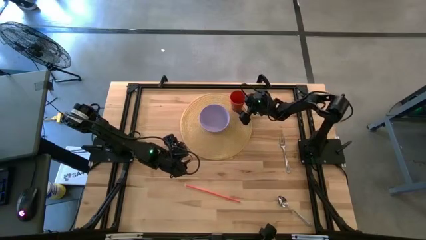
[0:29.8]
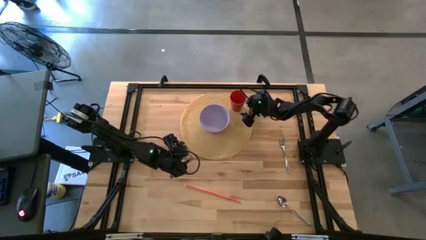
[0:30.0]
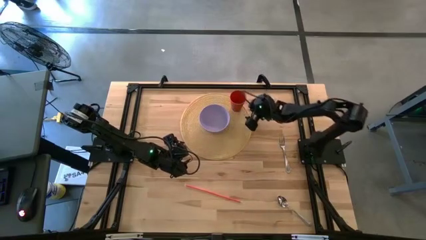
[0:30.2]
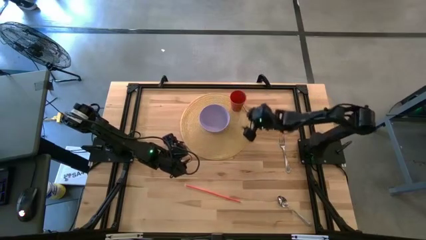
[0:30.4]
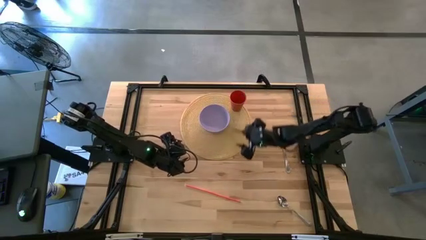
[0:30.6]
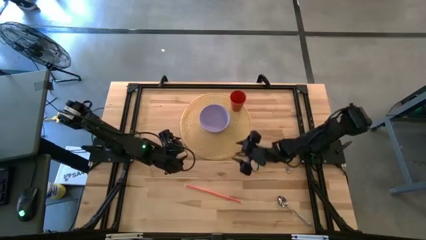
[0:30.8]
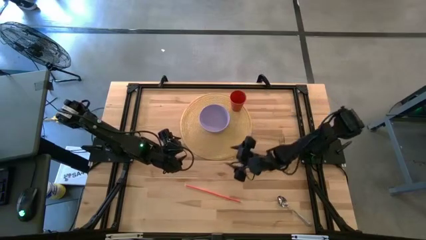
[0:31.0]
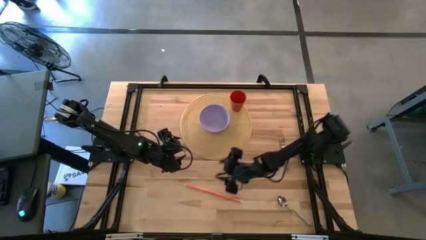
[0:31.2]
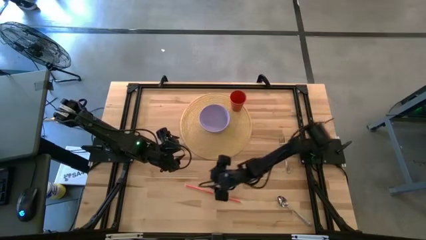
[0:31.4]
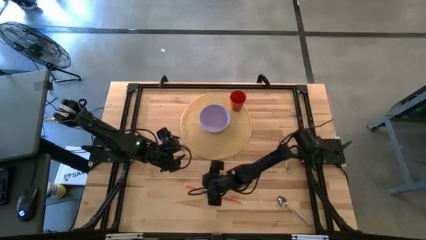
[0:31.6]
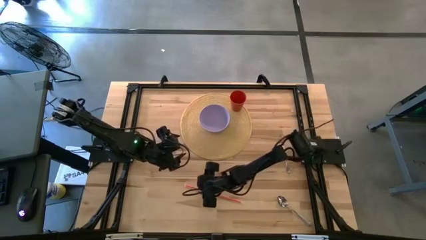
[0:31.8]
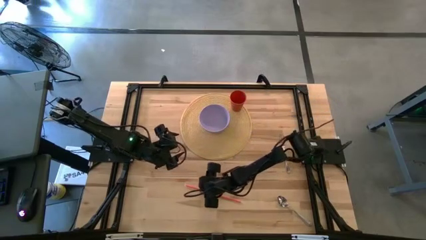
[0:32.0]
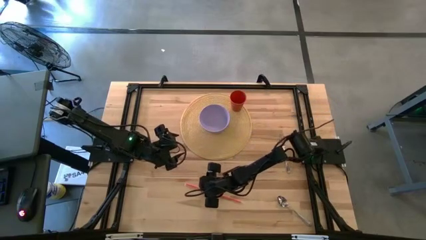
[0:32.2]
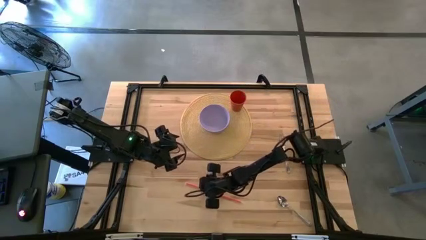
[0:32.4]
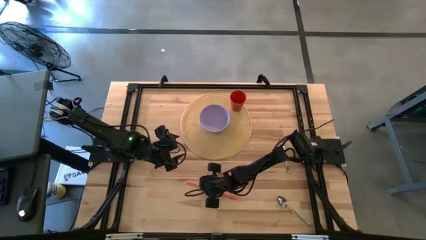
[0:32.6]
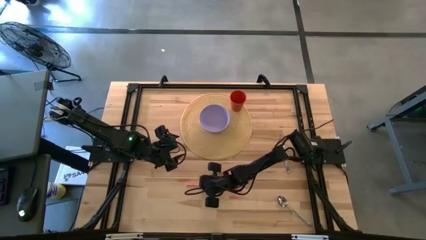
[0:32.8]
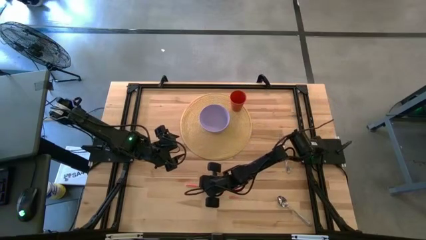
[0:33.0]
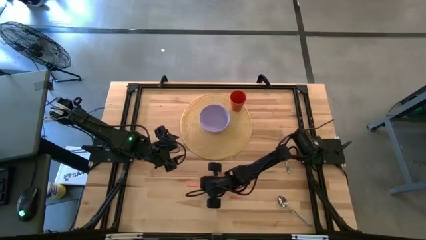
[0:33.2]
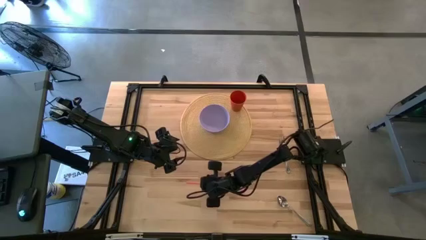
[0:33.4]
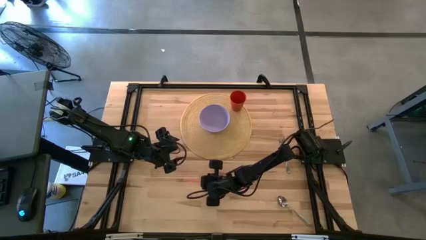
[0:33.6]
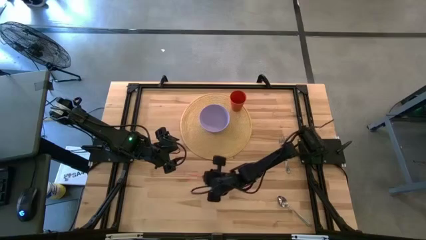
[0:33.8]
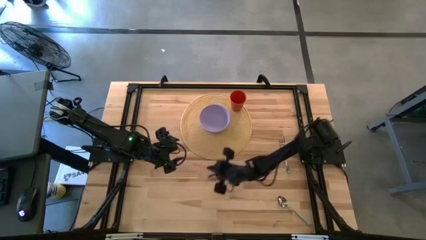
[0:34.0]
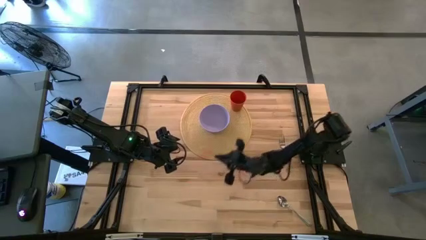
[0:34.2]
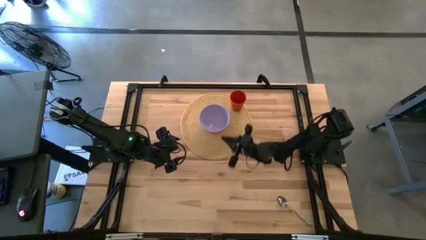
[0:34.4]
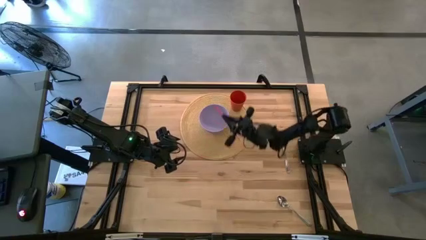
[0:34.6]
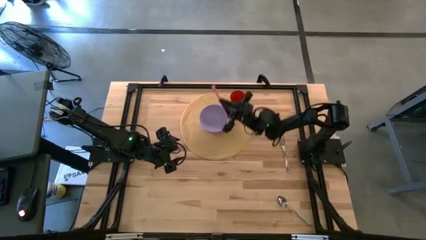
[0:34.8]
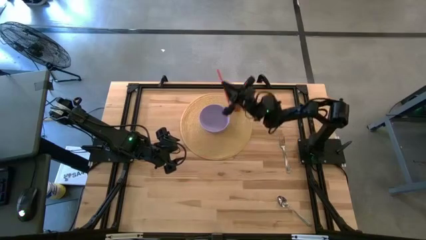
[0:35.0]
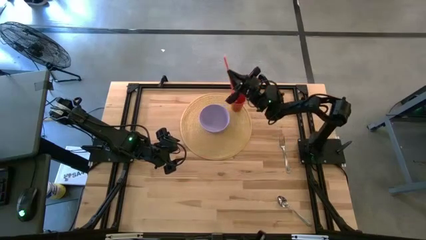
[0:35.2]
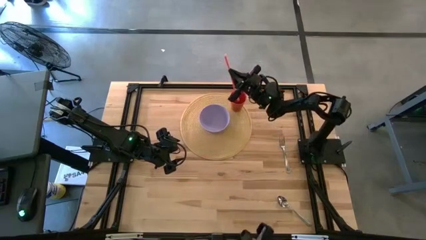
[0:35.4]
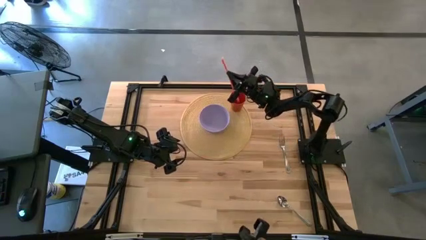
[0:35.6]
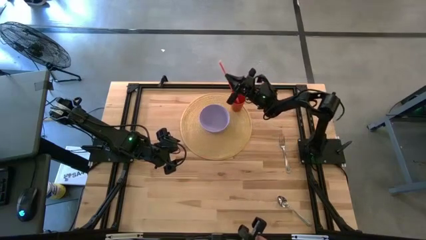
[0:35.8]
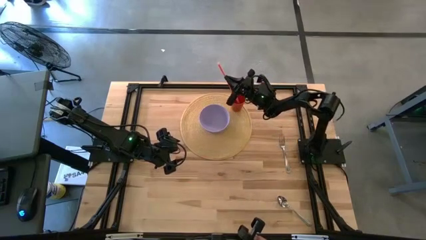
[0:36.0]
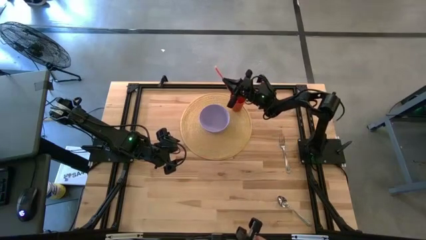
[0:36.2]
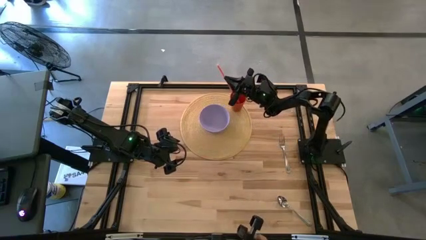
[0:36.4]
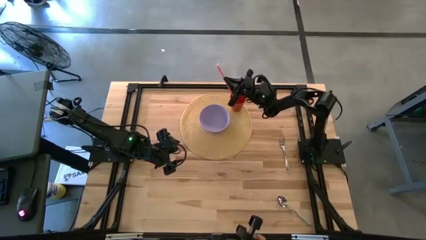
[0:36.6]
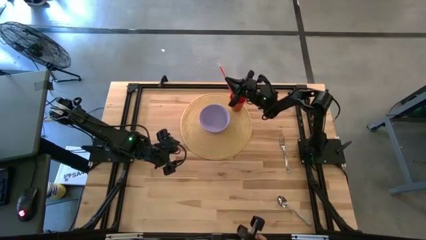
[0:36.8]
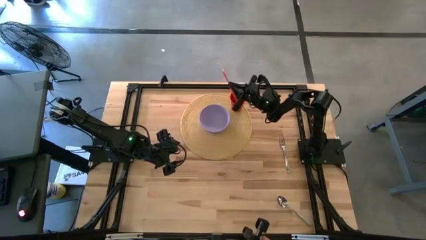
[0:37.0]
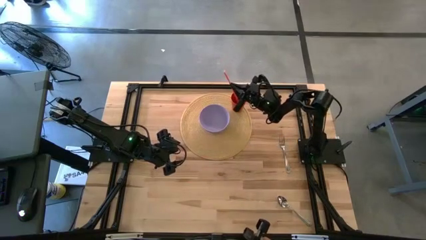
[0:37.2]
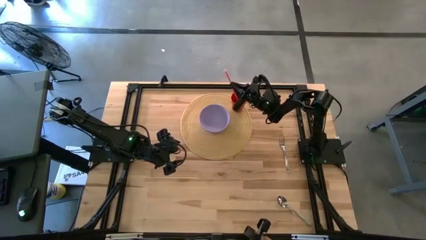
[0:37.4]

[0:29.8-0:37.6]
Task: Pick & Place Utensil
Put the straw into the orange cup on the table placemat

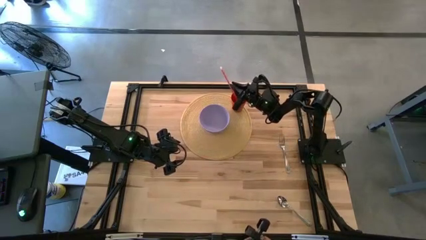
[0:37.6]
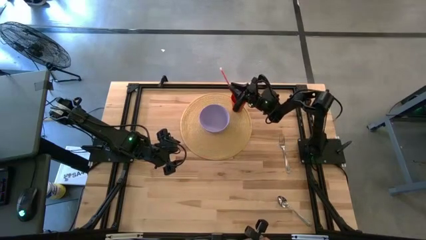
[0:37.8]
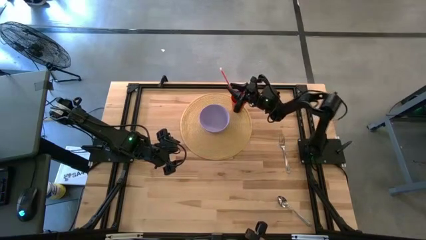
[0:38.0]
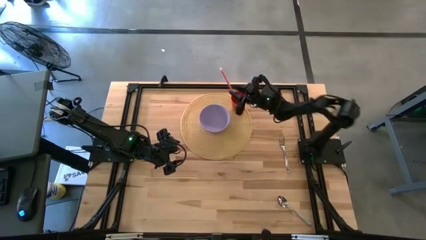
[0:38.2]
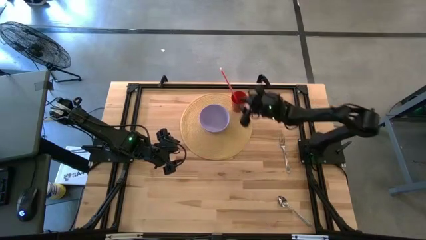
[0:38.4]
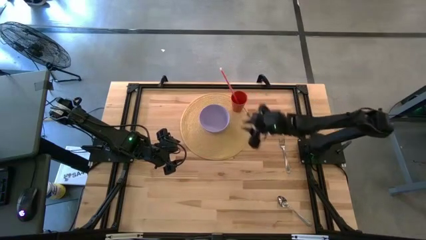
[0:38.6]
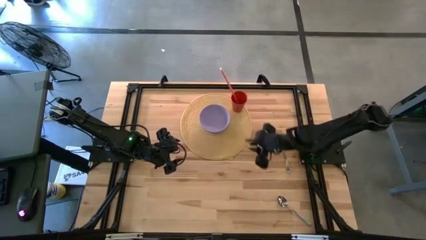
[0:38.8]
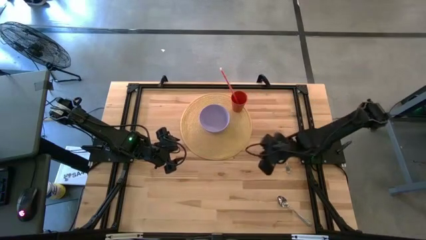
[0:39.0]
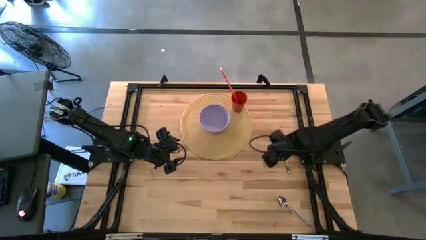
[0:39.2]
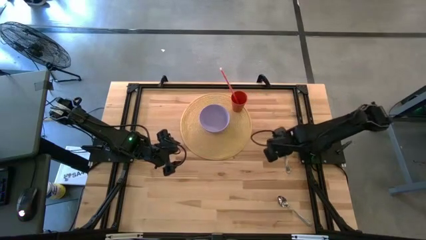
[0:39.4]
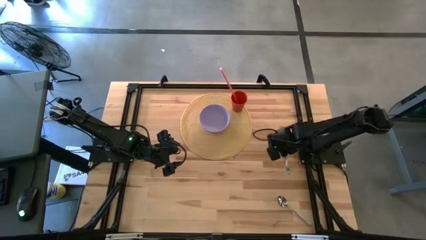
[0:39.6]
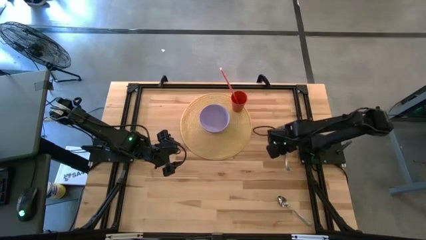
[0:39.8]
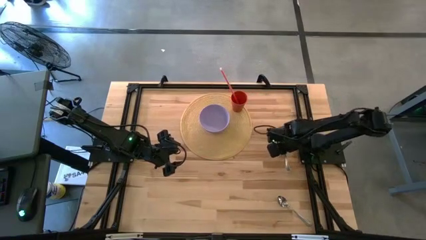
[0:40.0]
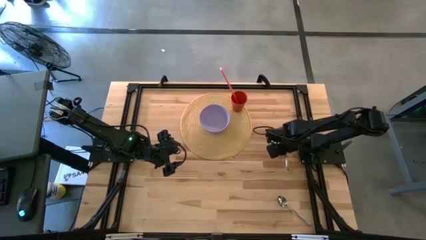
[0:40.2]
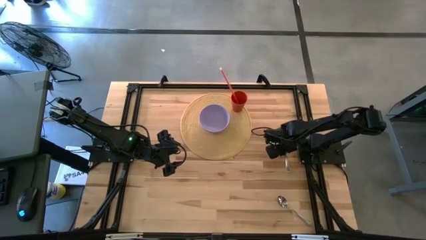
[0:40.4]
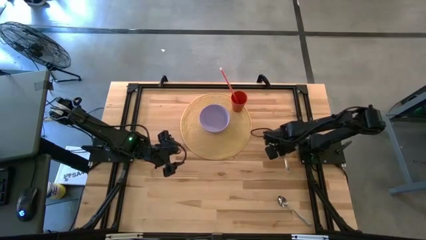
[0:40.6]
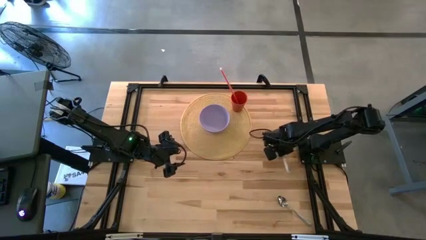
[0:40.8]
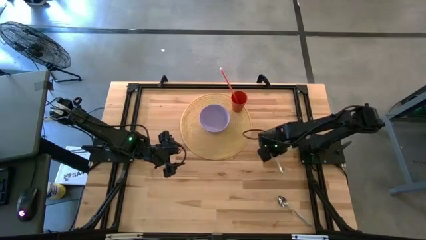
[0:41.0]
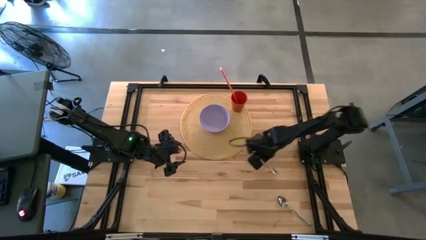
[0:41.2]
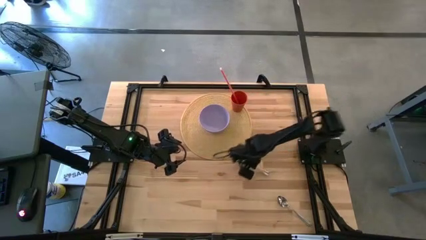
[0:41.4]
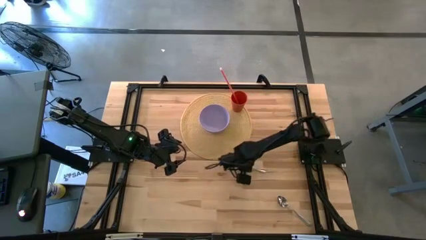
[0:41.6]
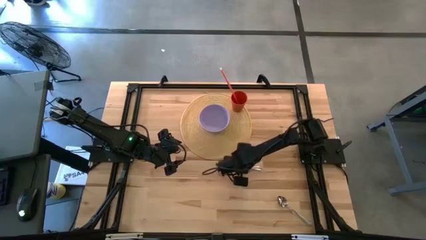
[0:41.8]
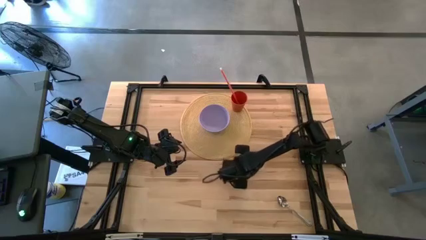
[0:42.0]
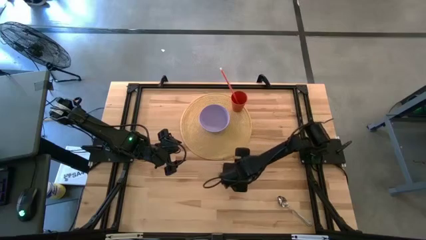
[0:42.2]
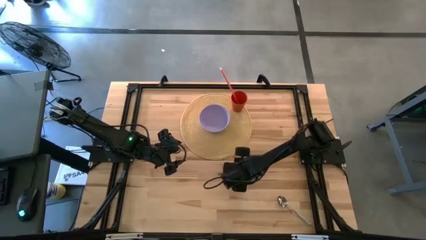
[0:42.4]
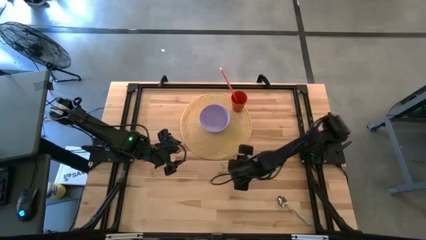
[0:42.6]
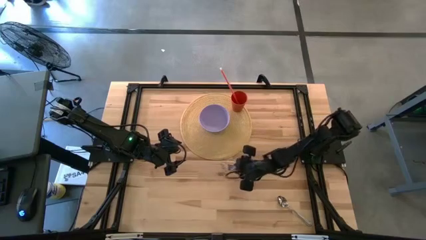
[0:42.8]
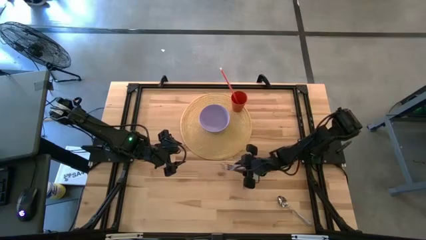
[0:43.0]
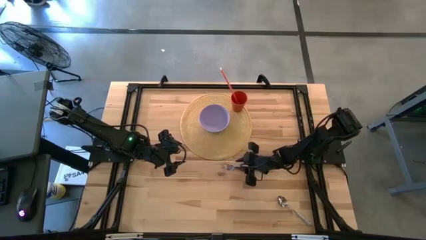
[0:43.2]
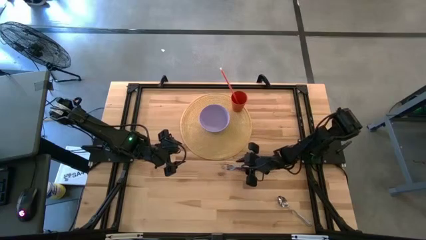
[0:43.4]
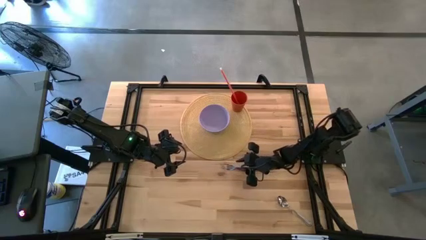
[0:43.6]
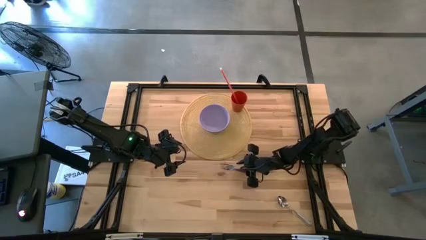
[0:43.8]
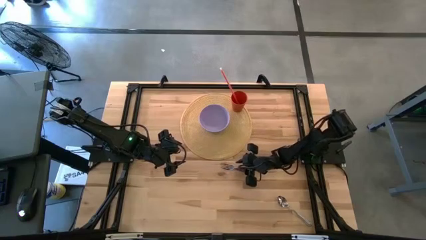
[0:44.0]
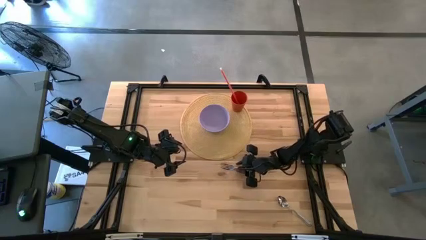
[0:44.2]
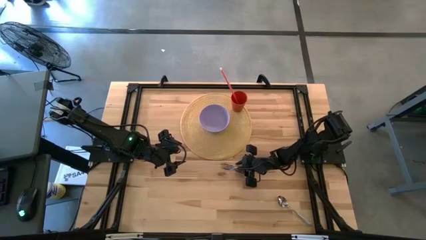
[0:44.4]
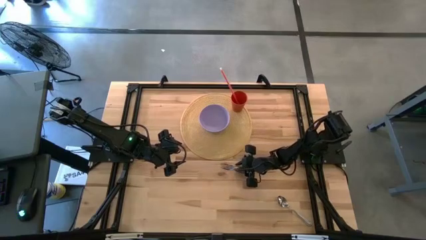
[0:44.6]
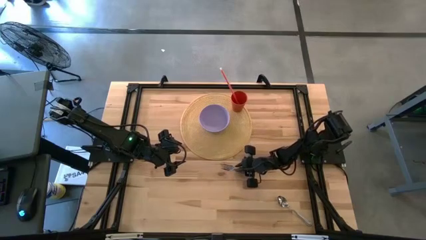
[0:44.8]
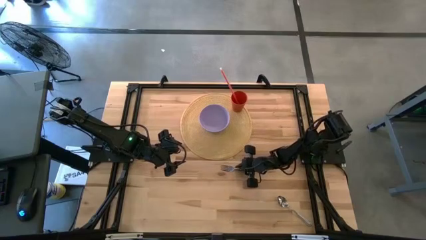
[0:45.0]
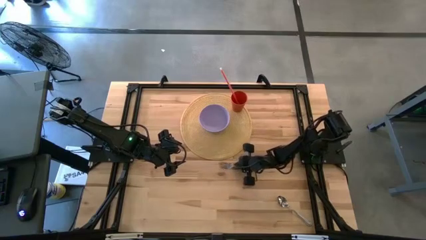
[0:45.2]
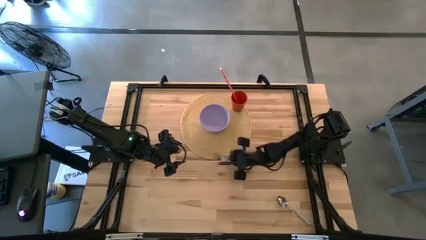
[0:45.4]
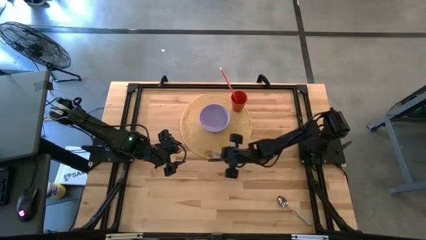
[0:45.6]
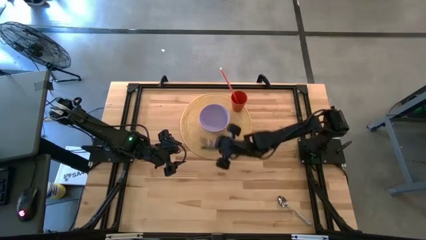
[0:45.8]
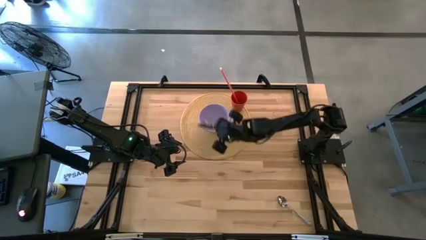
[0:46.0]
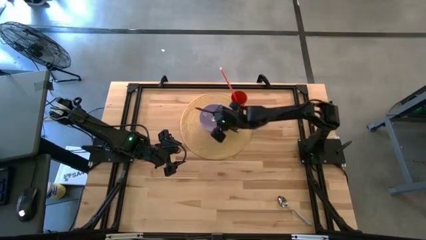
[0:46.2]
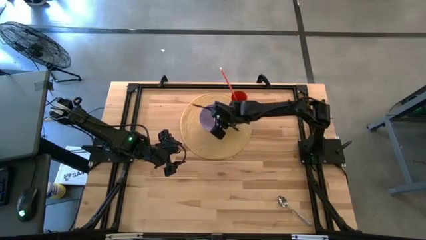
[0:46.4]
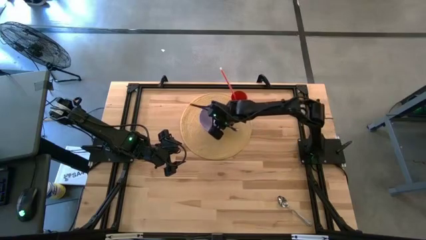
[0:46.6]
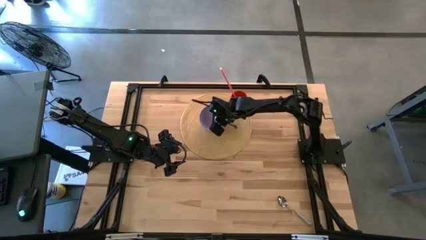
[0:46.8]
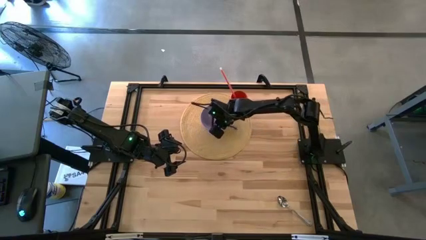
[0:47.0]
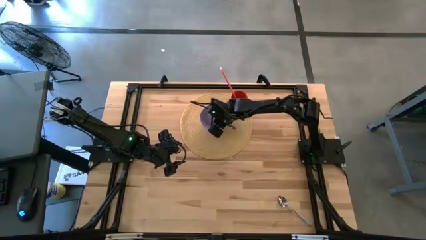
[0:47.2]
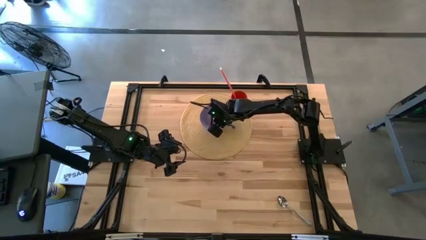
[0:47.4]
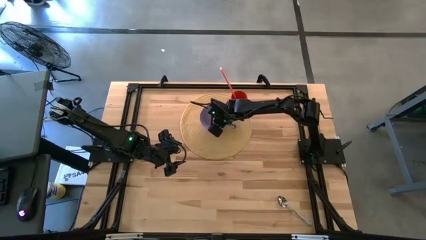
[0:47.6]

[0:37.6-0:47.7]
Put the silver fork into the violet bowl on the table placemat
